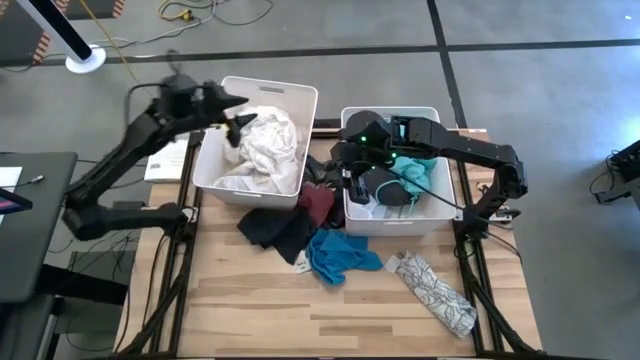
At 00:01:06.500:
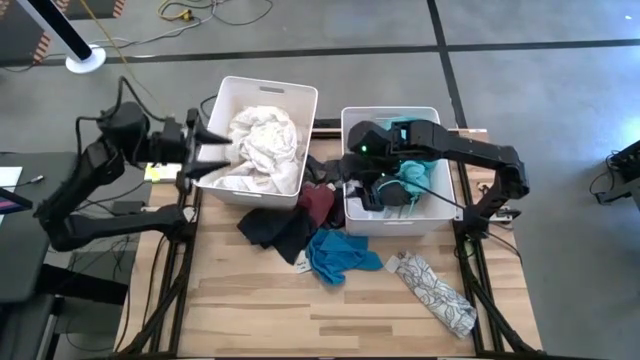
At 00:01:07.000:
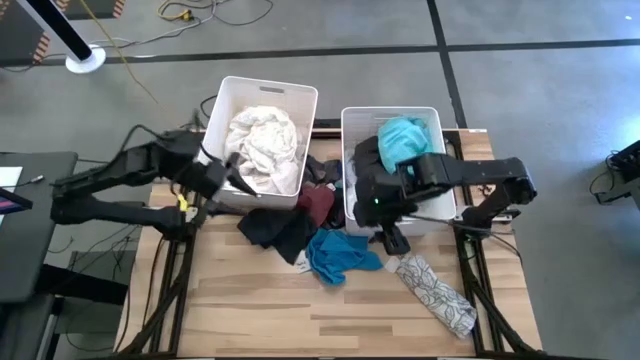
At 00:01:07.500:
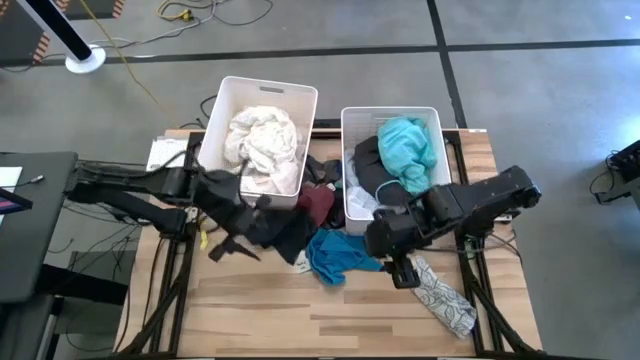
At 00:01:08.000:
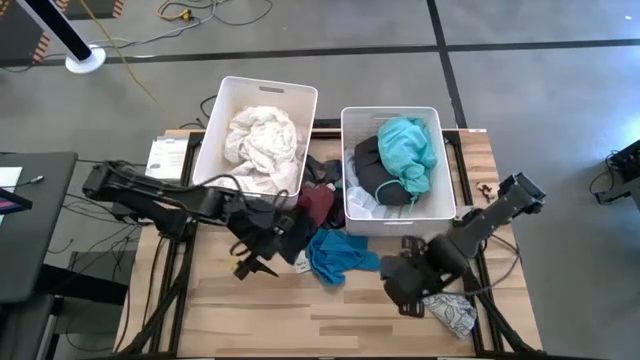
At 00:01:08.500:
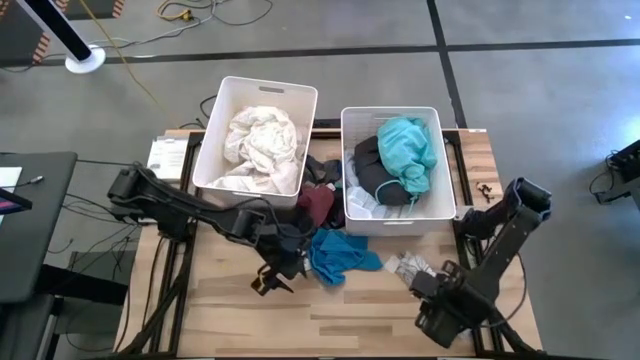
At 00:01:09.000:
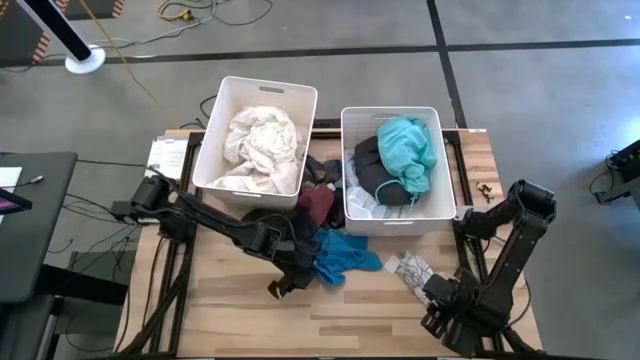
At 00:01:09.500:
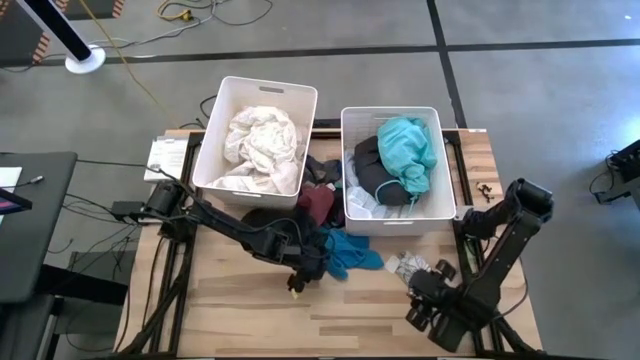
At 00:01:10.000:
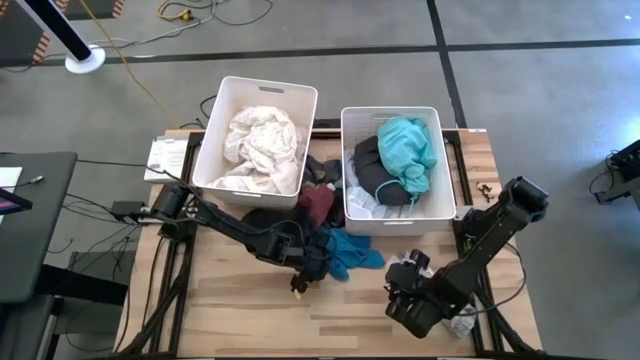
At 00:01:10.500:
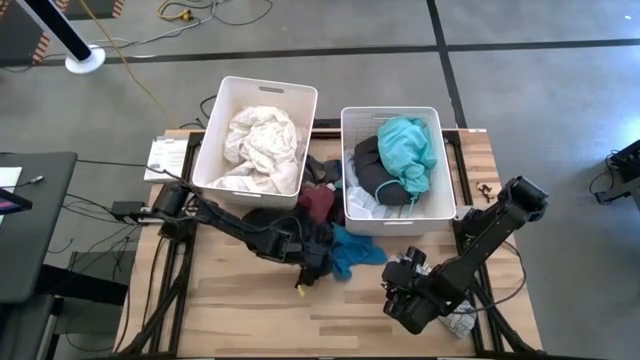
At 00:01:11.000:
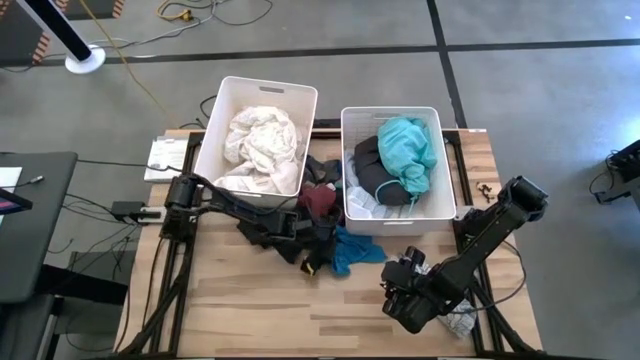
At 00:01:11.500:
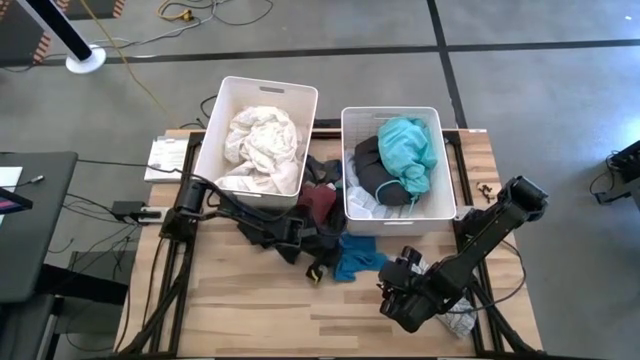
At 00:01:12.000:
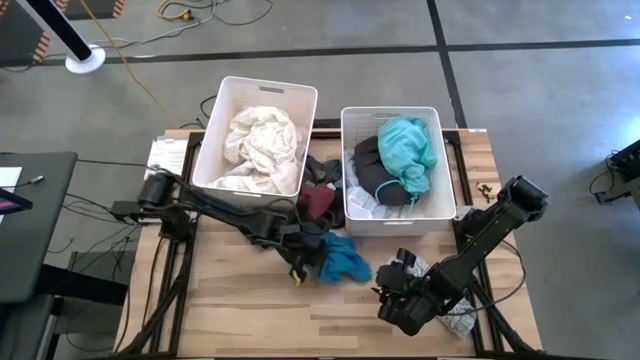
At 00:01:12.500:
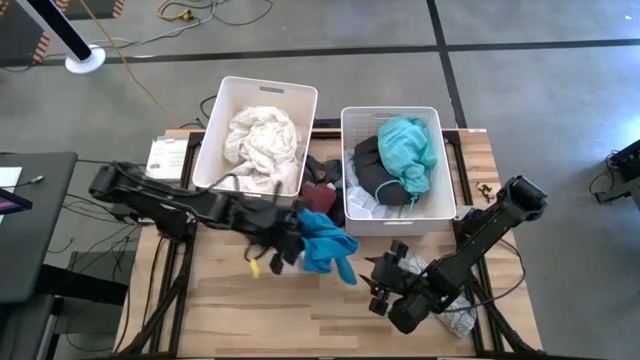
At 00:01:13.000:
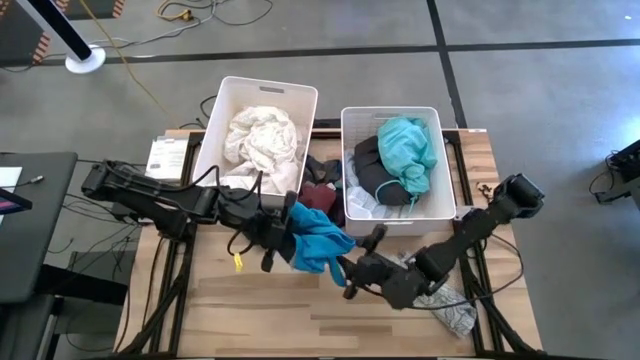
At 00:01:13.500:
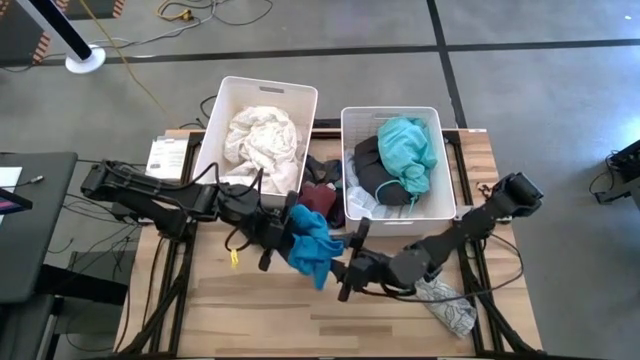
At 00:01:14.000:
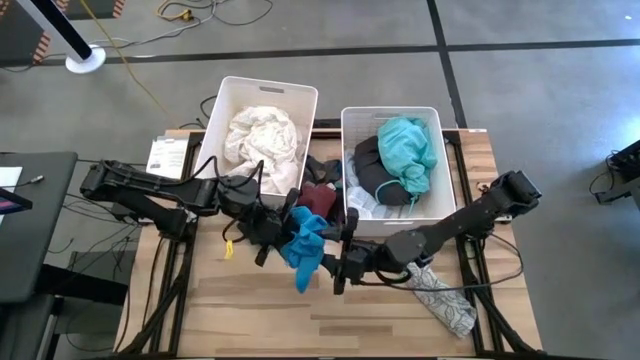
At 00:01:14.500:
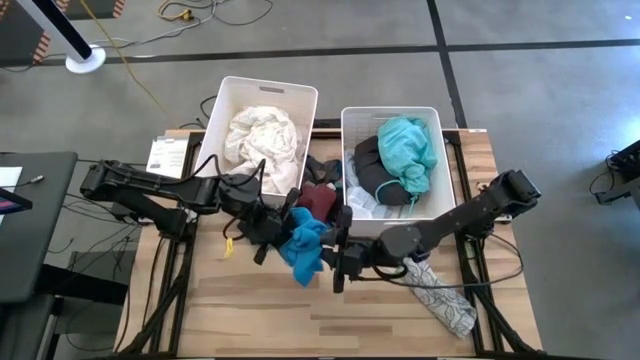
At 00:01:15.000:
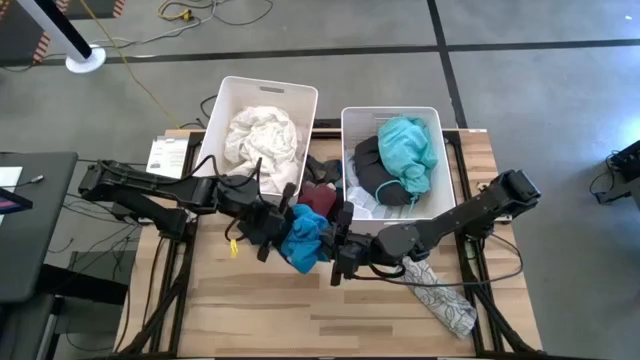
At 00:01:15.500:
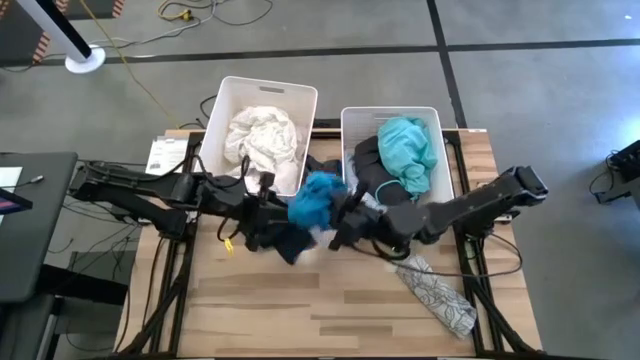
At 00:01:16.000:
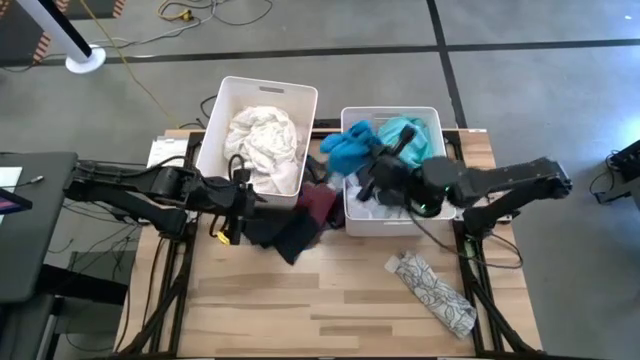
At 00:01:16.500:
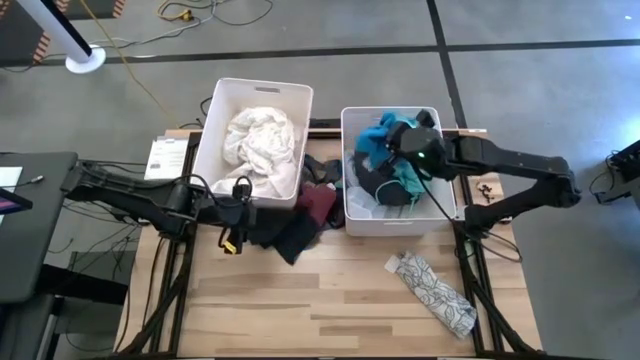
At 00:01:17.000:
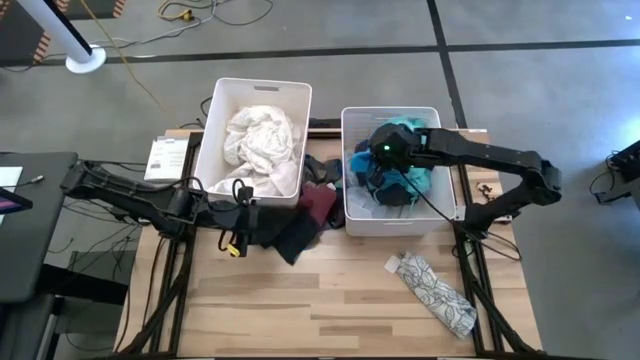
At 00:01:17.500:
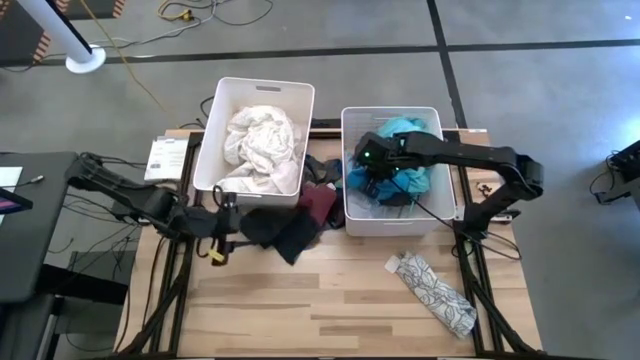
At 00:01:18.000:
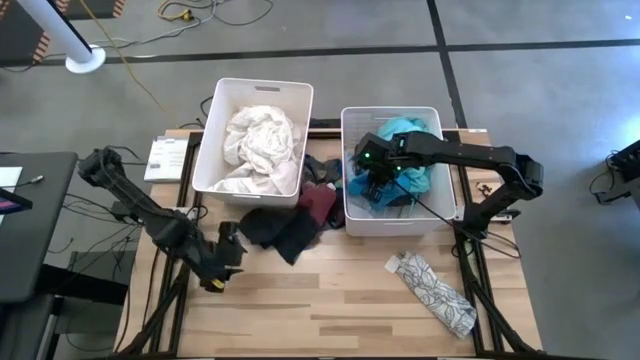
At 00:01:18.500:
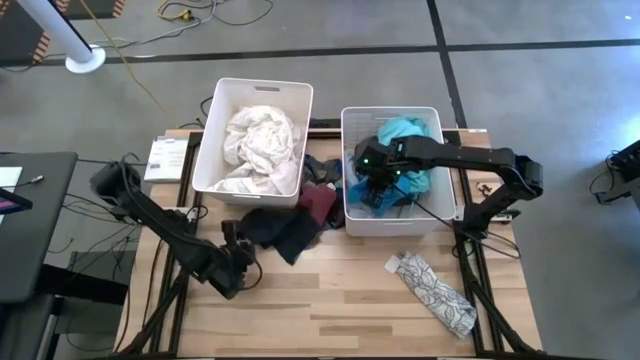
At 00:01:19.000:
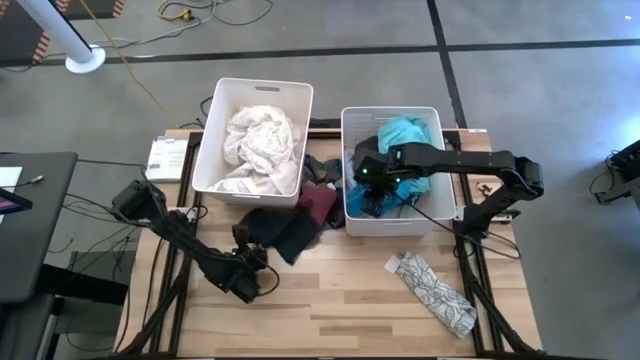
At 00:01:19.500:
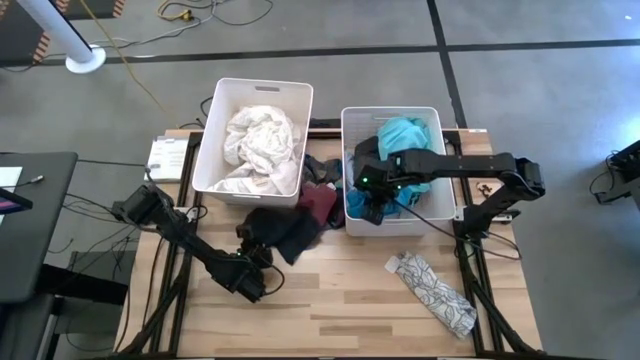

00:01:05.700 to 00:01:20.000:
Task: Sort clothes
Put the blue shorts into the right white laundry bin

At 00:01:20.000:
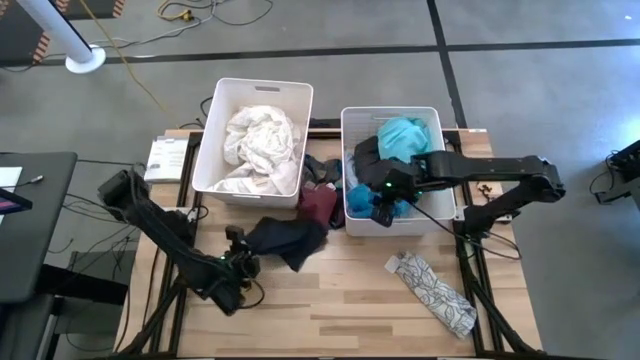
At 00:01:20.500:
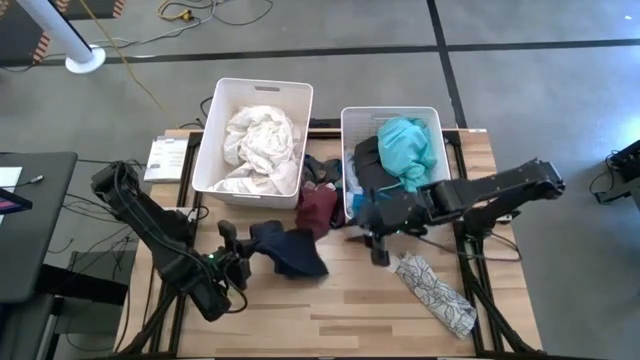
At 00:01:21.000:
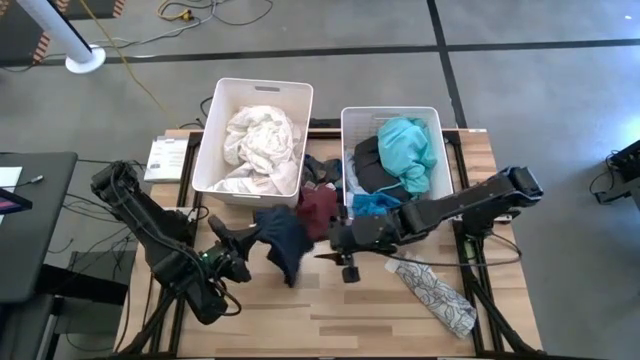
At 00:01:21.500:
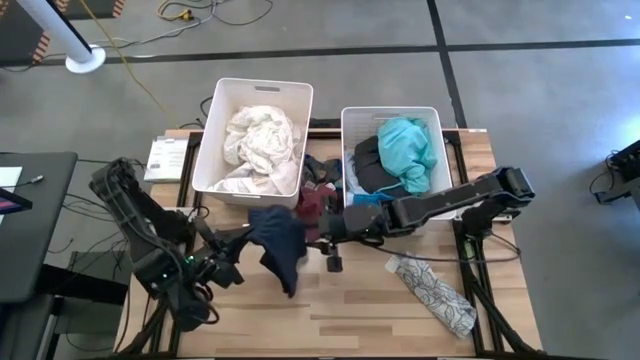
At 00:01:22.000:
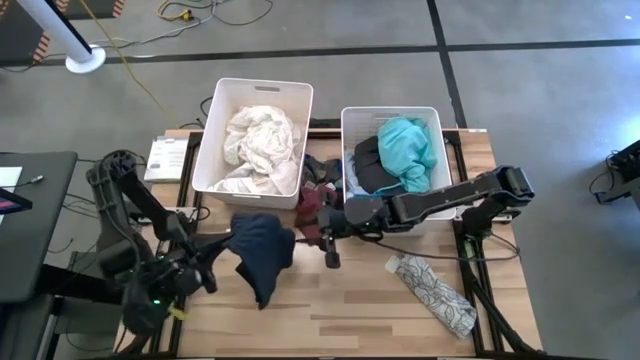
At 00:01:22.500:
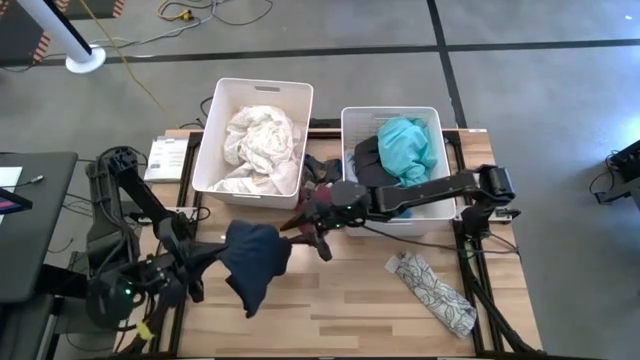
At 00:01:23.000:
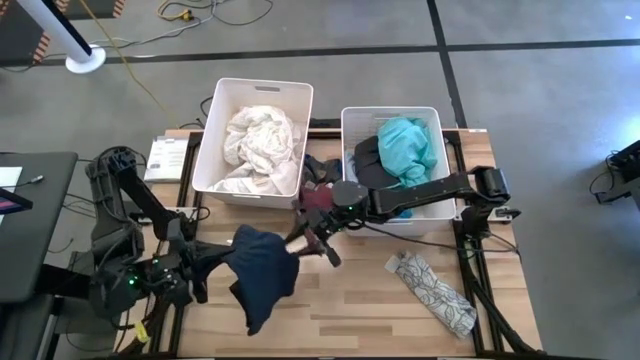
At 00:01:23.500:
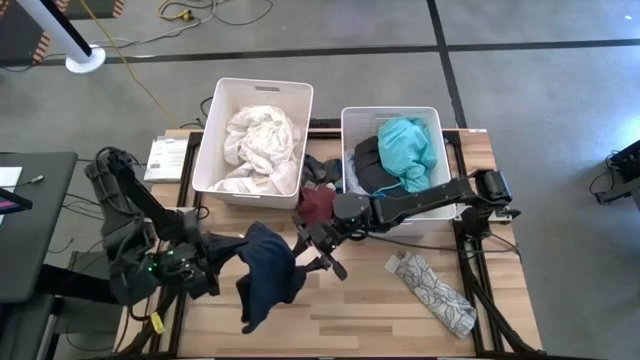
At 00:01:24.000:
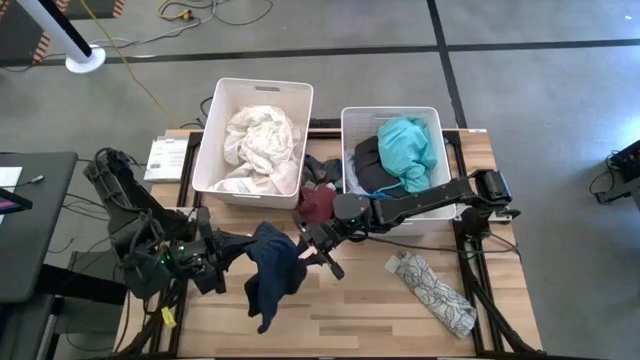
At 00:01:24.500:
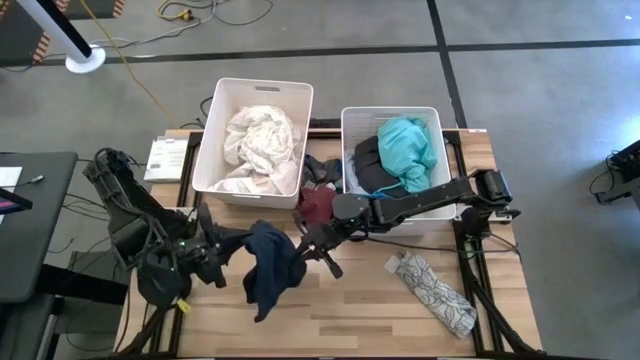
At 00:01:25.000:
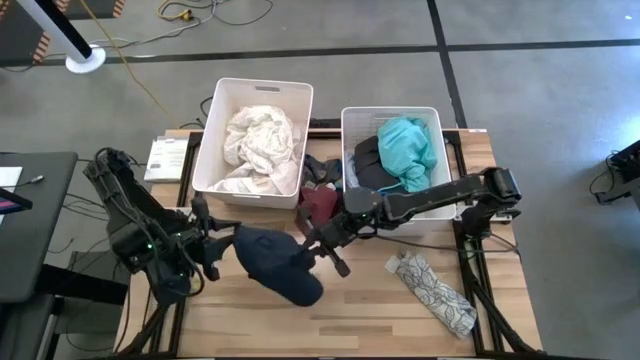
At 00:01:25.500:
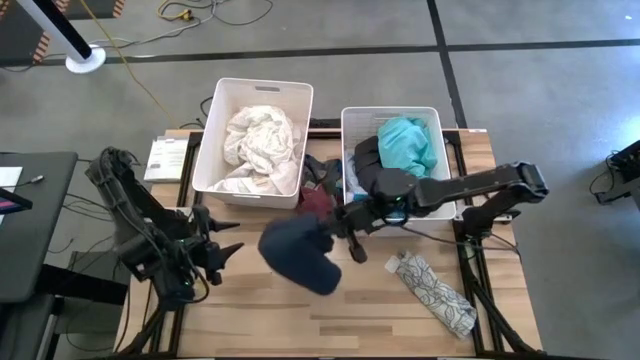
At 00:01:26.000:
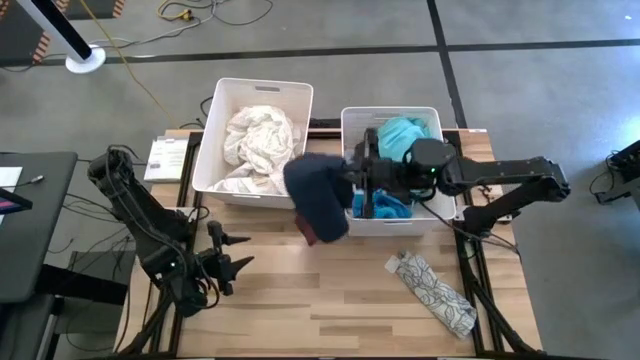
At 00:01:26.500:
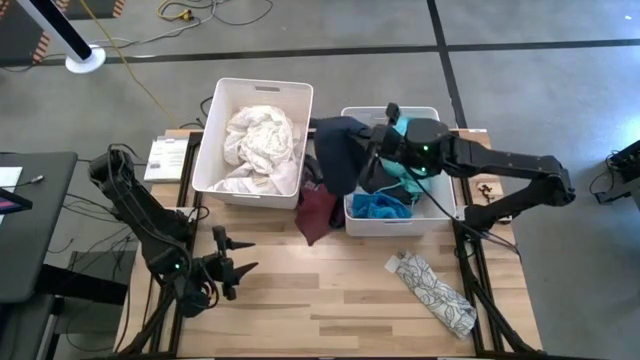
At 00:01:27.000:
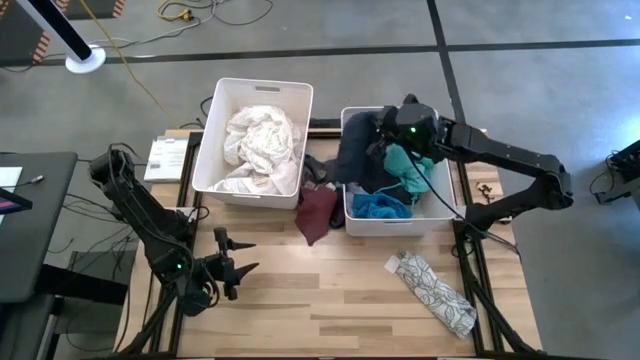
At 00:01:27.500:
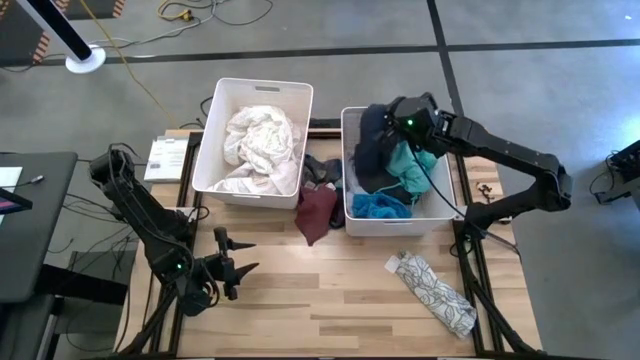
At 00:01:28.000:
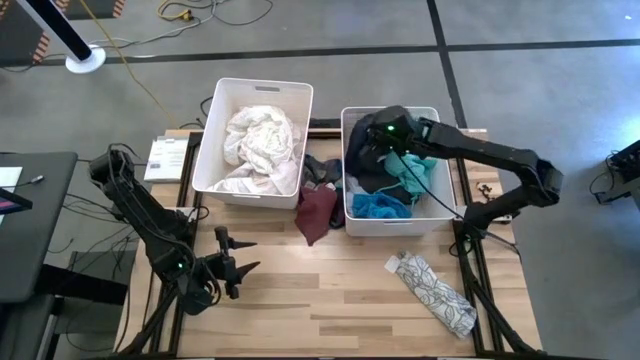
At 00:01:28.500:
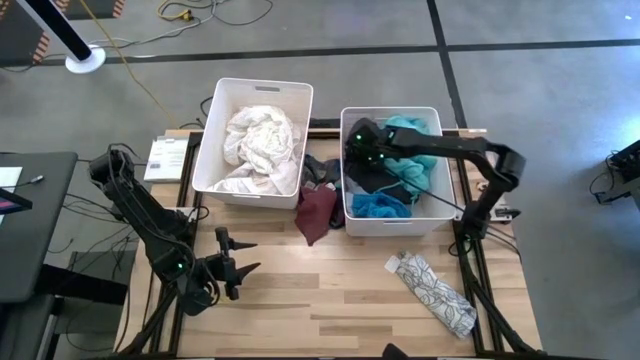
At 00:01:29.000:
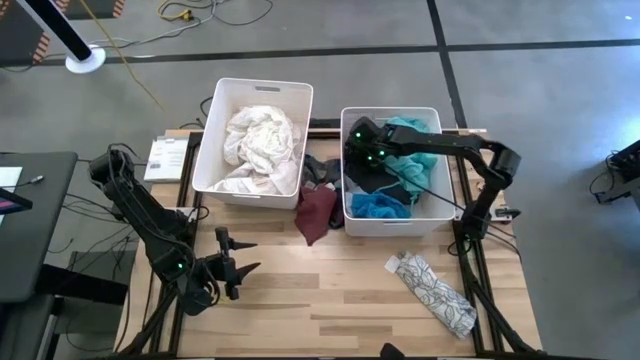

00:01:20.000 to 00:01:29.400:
Put the dark blue shorts into the right white laundry bin
